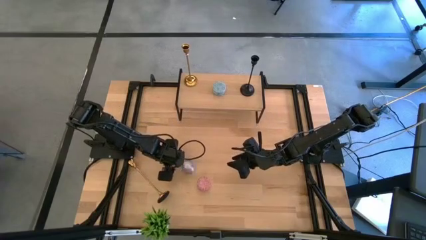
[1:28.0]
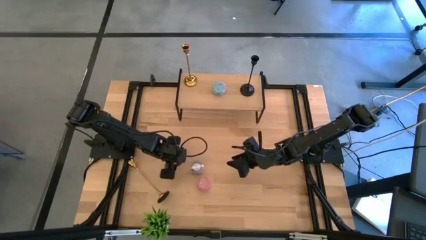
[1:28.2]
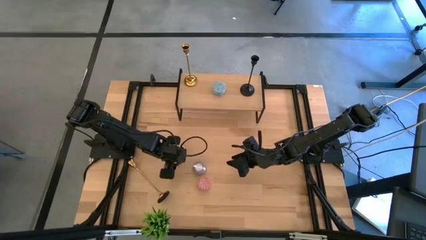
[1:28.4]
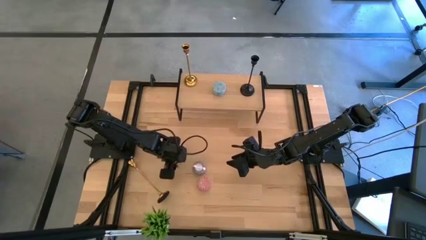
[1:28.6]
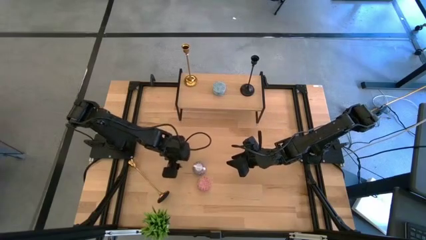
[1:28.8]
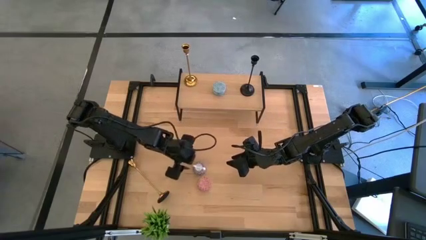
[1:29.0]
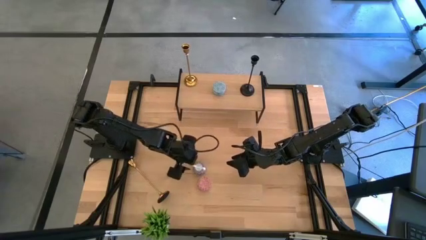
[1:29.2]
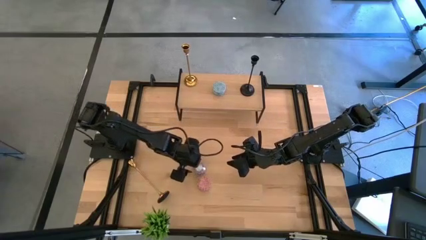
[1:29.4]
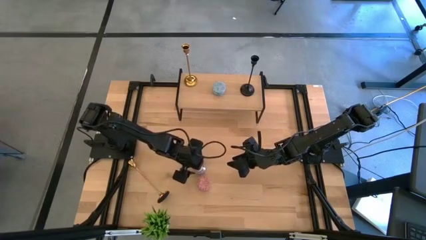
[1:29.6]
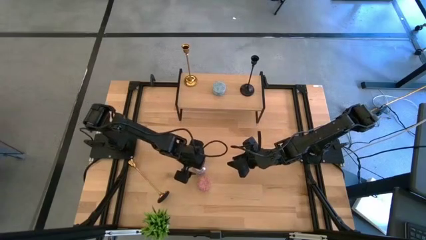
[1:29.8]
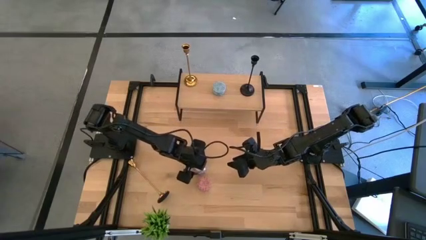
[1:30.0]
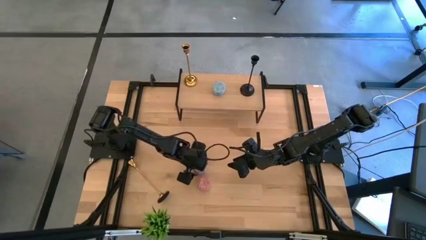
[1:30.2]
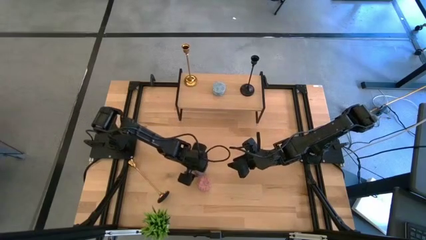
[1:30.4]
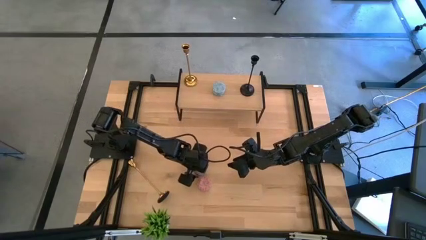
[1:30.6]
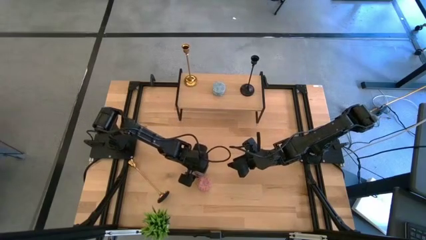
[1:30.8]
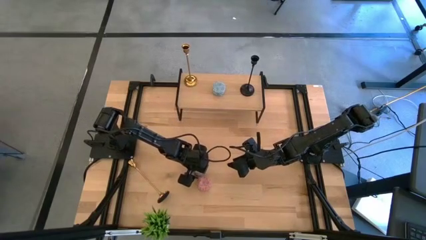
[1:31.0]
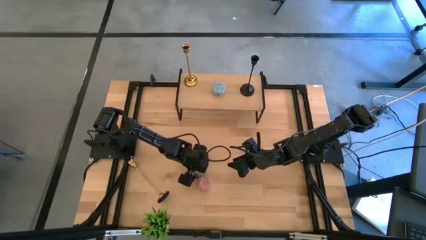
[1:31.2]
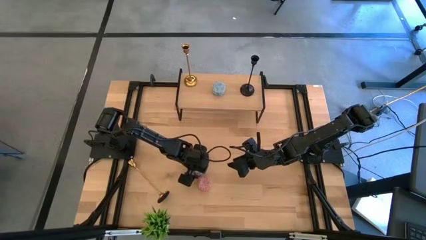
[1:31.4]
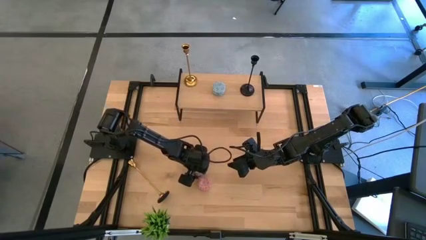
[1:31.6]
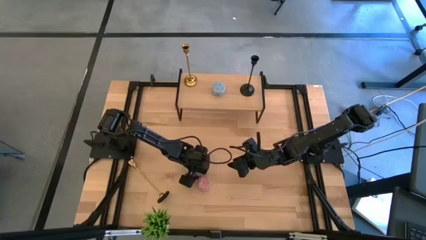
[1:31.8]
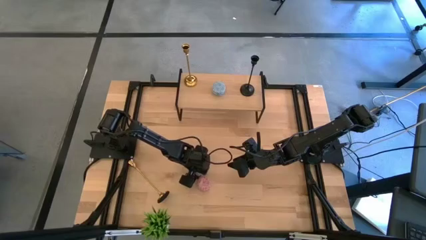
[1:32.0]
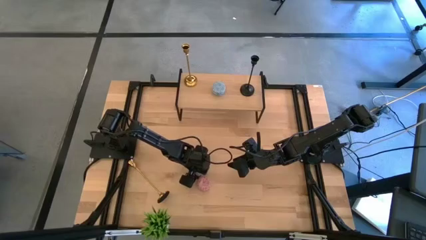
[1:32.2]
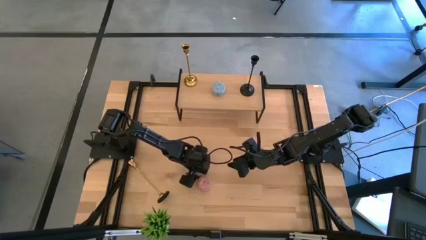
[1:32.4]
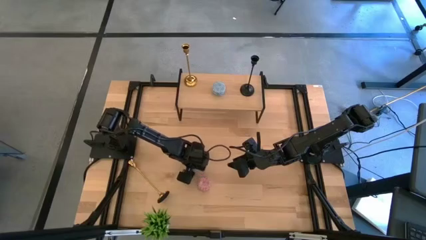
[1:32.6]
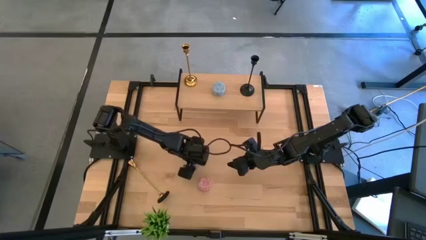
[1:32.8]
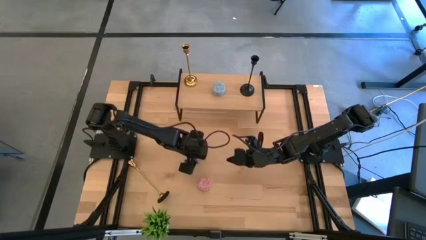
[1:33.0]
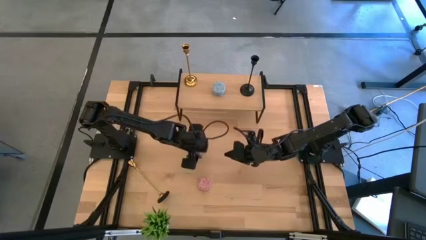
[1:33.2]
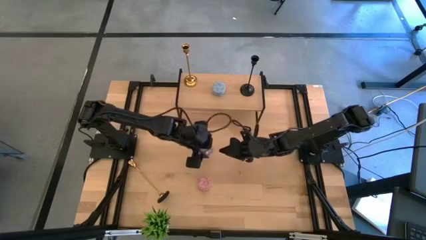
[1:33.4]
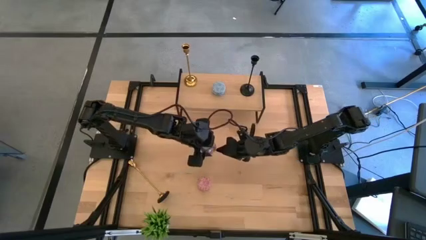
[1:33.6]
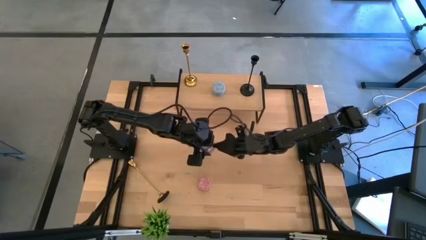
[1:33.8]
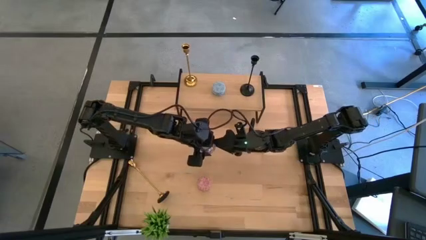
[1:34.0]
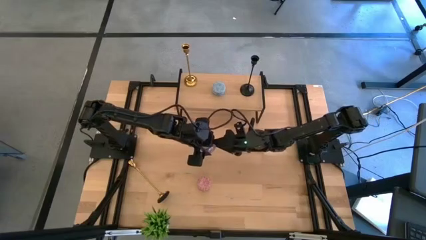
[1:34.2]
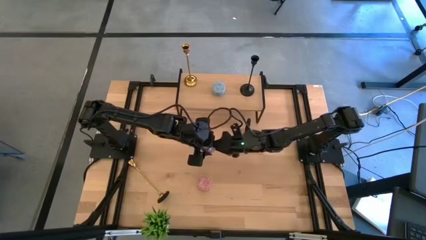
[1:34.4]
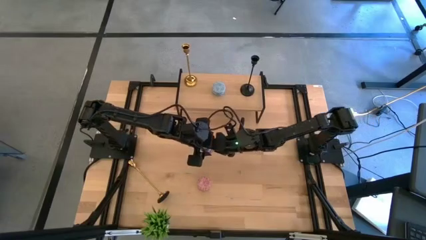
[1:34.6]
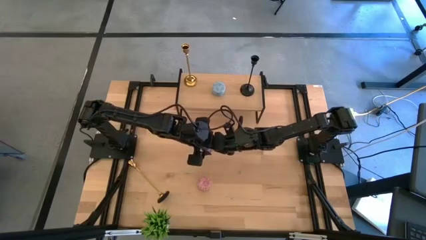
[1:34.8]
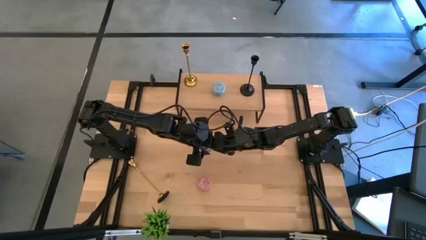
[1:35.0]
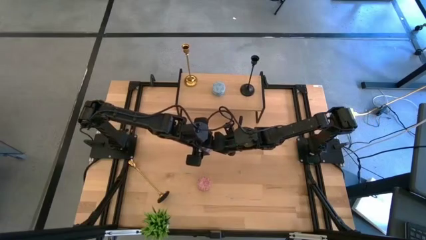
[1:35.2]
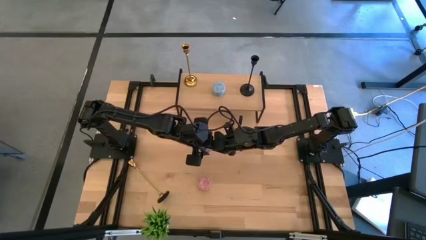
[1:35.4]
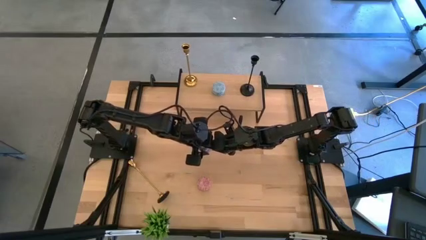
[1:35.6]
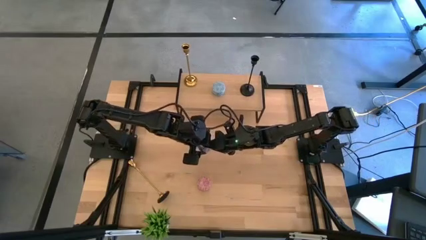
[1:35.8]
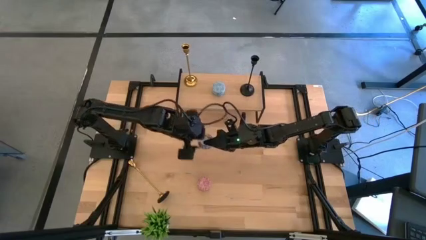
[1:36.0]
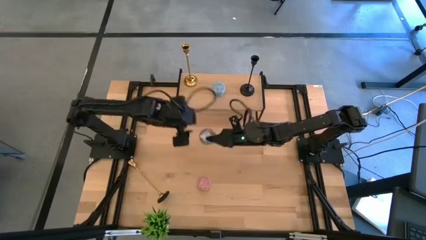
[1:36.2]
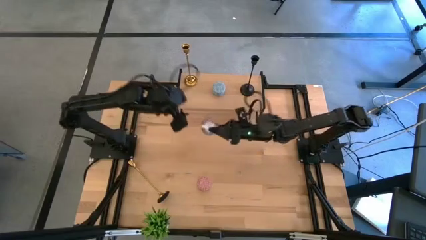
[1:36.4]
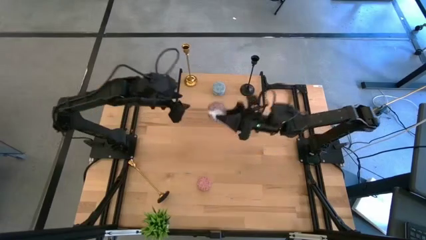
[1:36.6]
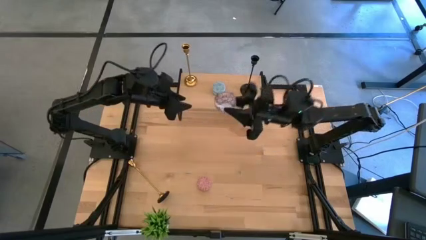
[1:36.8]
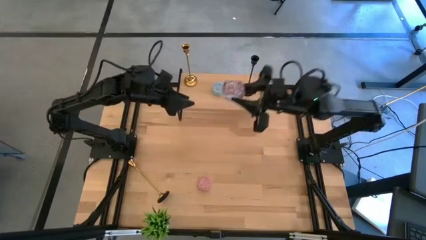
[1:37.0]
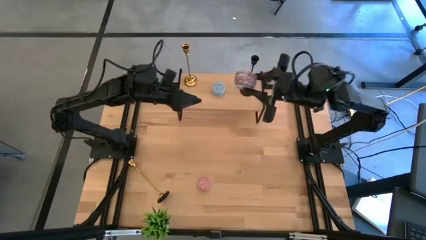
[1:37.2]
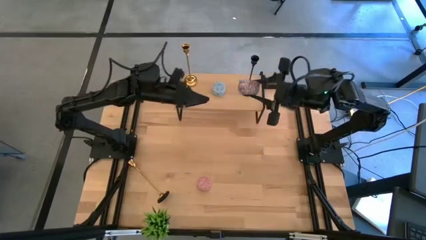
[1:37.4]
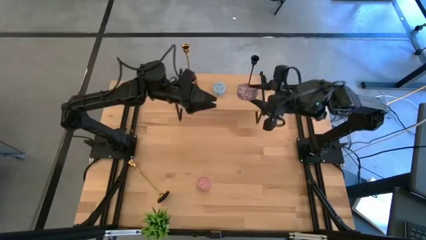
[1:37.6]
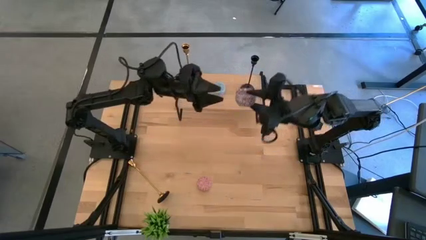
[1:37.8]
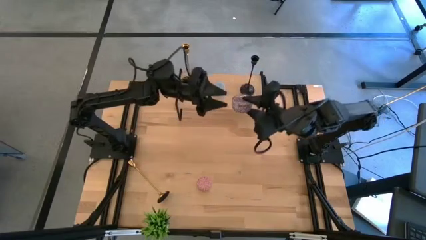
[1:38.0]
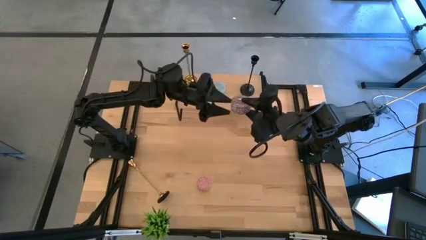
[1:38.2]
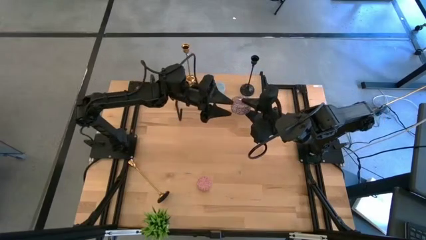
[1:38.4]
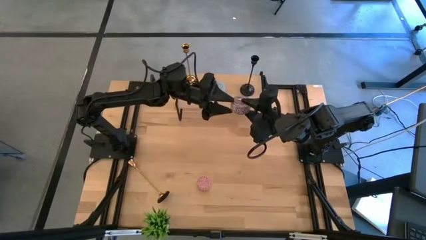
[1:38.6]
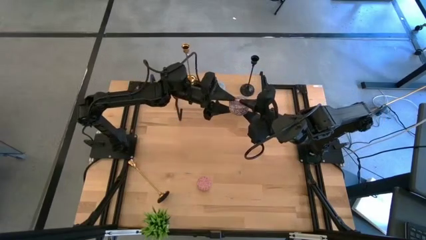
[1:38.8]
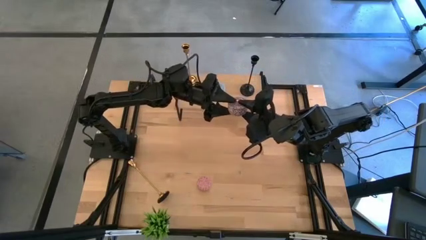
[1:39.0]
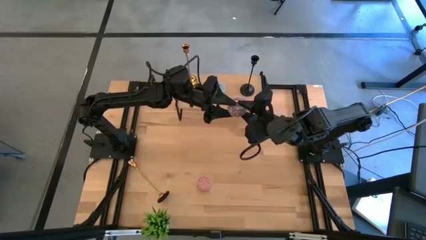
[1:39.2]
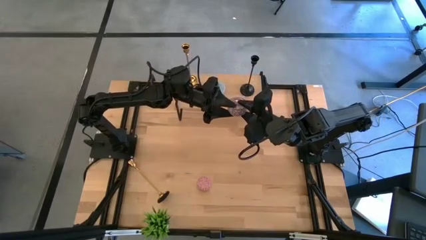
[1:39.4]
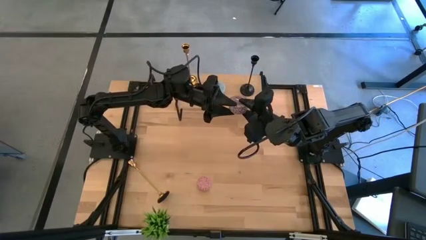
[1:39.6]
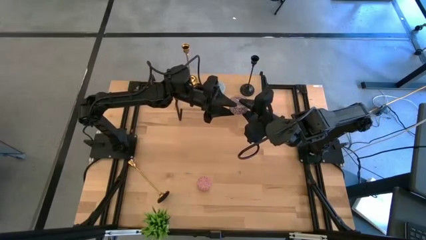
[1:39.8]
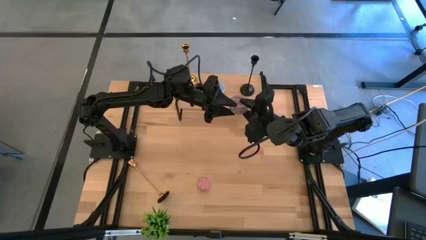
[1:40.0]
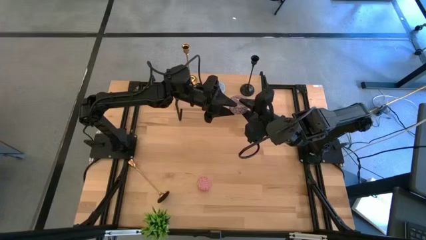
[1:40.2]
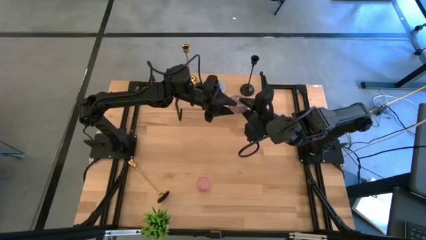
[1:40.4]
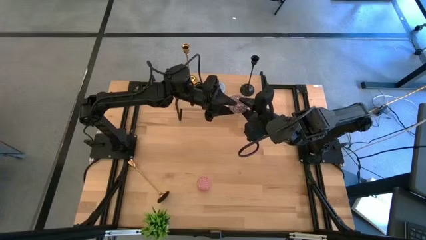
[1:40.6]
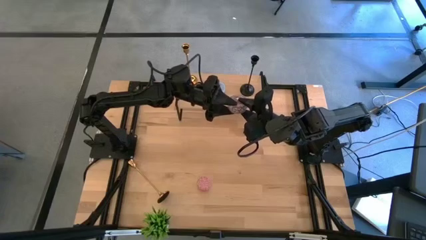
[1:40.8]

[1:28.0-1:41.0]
Task: Pick & Place candle stick holders
Put the red scented candle on the shelf

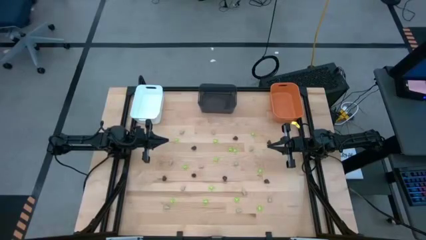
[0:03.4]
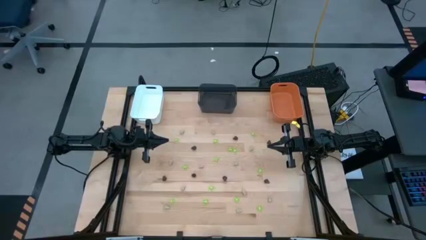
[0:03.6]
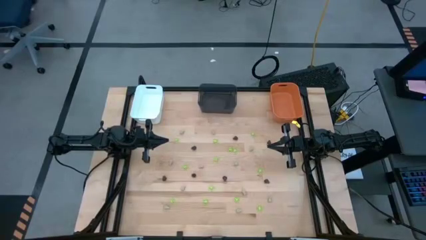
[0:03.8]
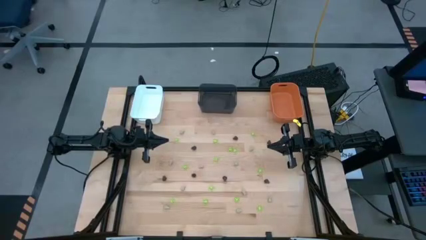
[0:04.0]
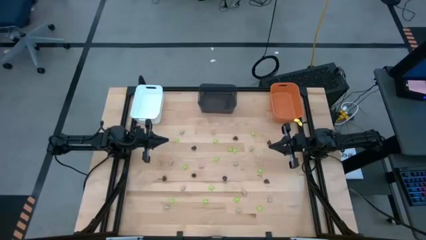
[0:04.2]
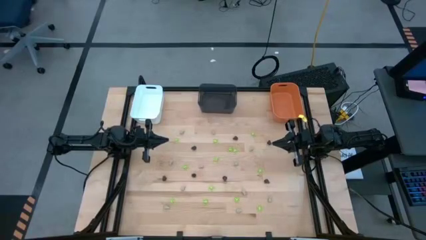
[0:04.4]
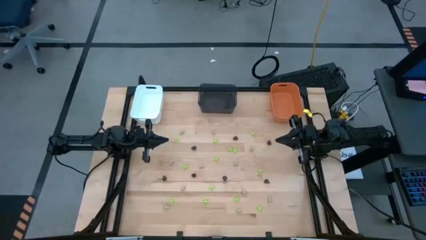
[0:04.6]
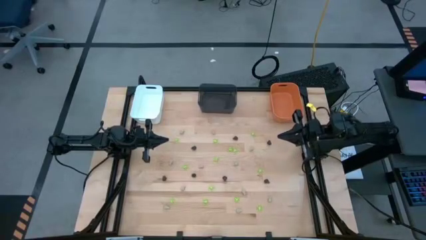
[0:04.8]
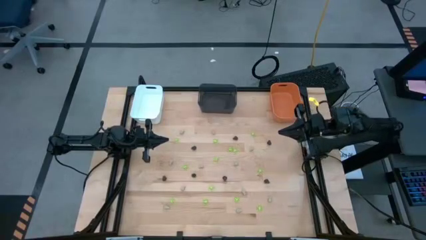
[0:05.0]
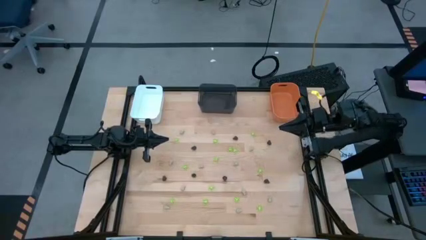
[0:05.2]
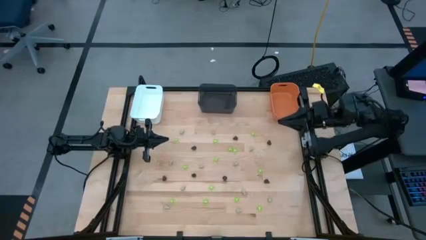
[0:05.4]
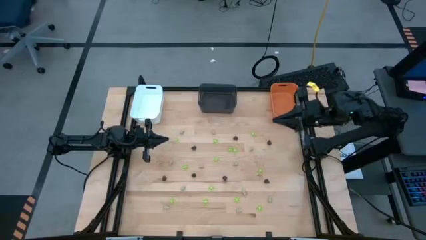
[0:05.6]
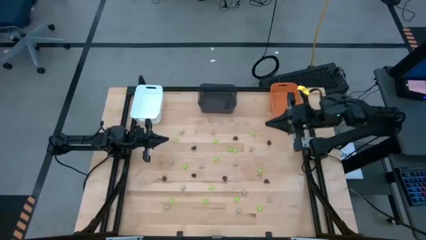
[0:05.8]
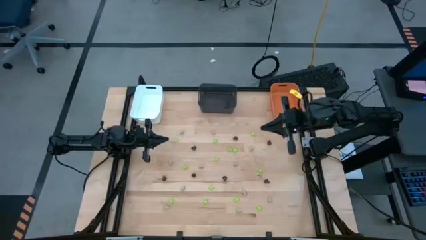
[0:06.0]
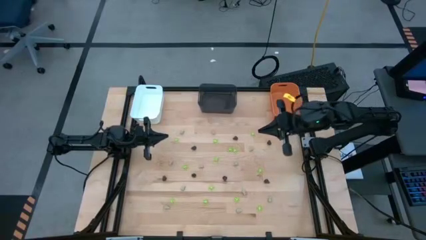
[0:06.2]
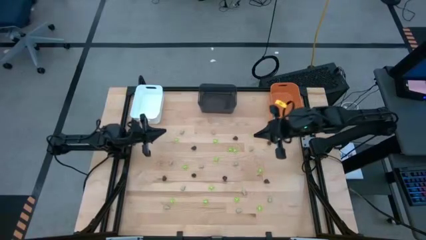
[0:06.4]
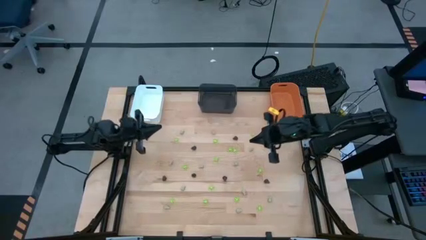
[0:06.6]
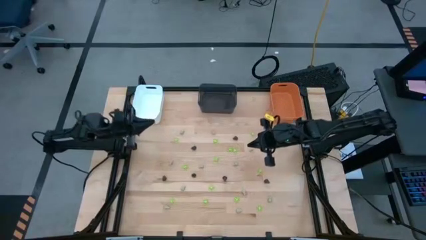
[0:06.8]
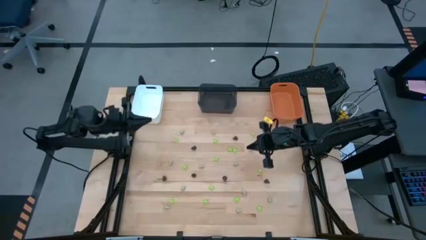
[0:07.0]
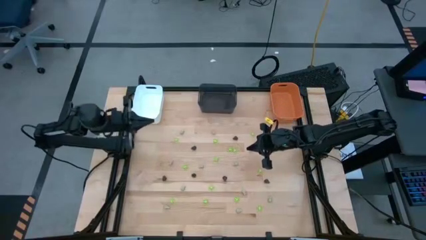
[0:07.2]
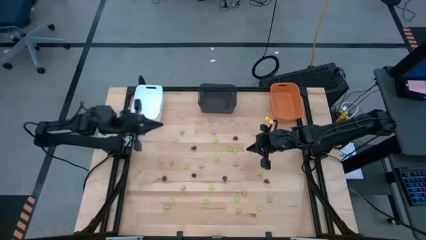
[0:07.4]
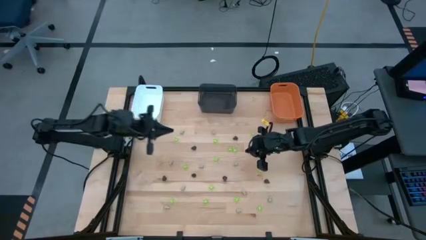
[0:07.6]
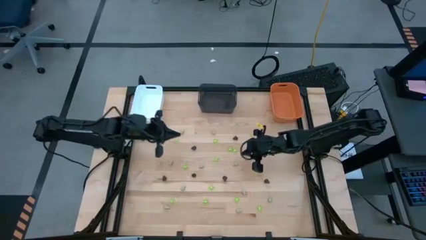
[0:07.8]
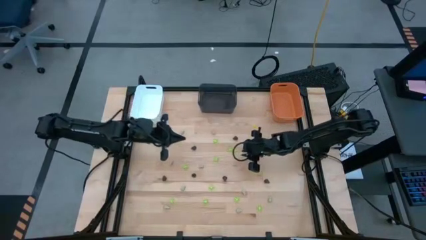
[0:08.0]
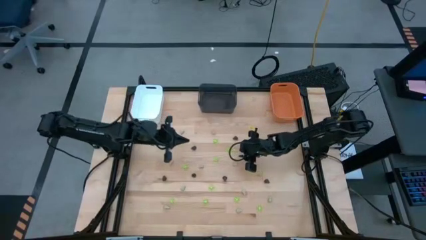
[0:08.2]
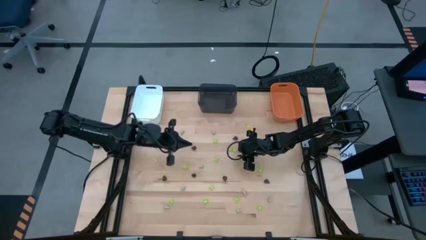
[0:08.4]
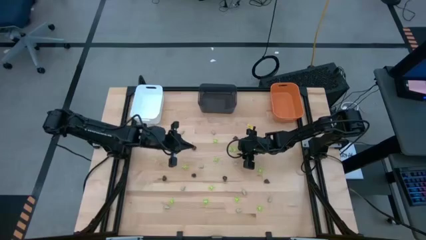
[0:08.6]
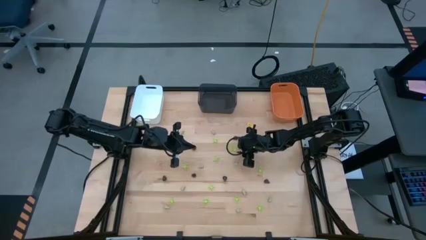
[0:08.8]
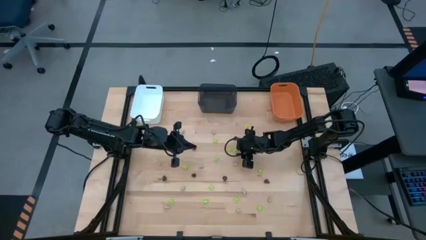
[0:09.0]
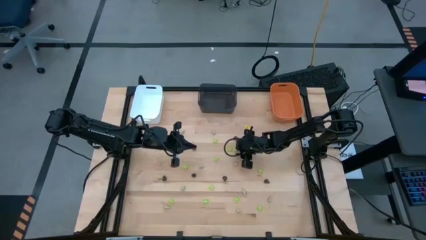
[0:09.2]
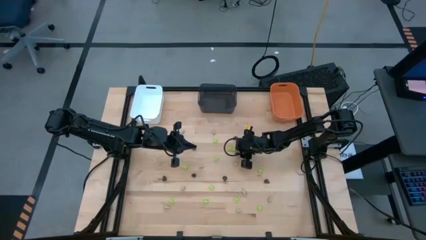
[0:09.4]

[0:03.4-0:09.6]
Task: Sort Halloween decoration
Put the green toy spider into the orange bin
